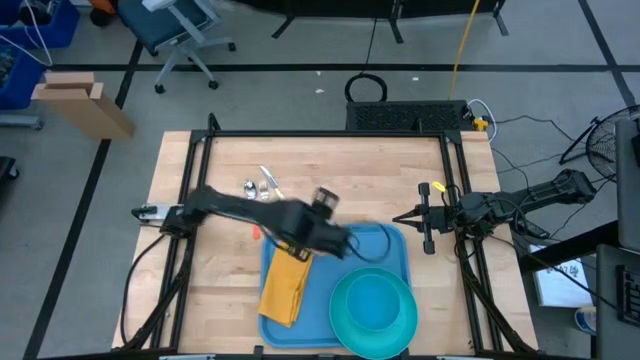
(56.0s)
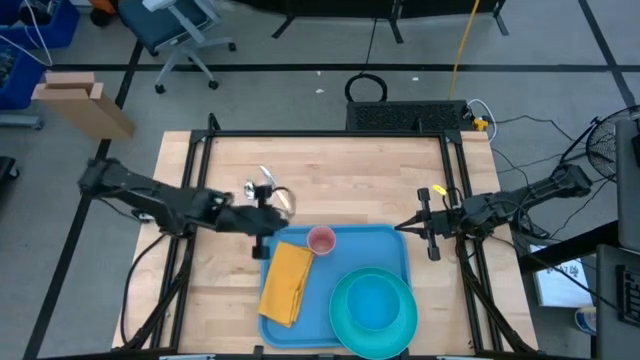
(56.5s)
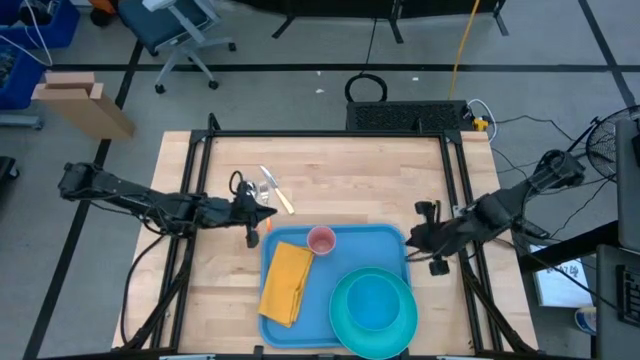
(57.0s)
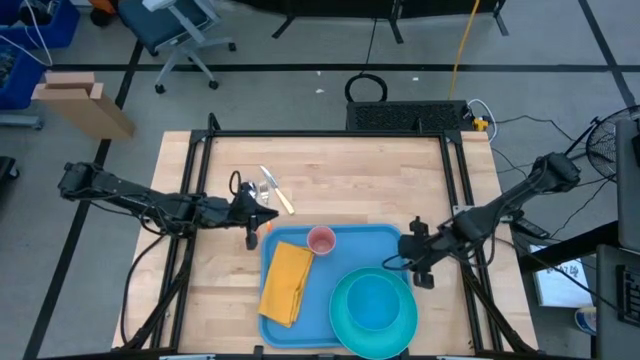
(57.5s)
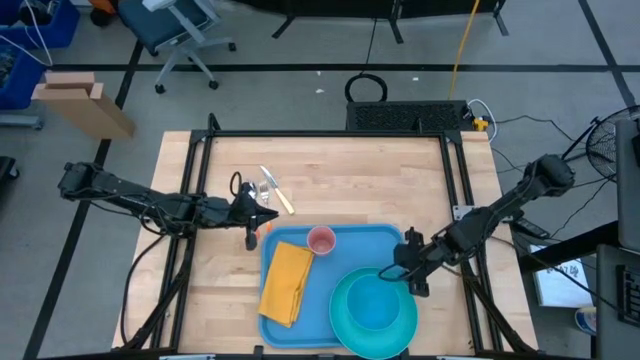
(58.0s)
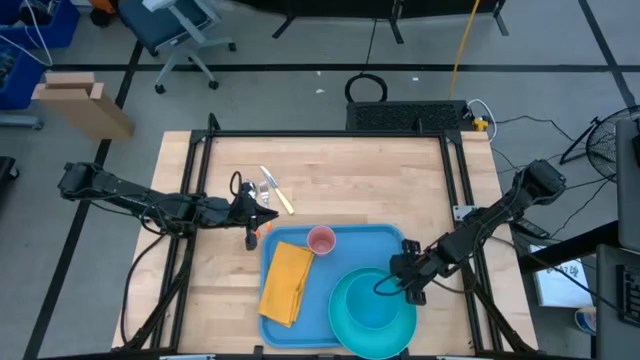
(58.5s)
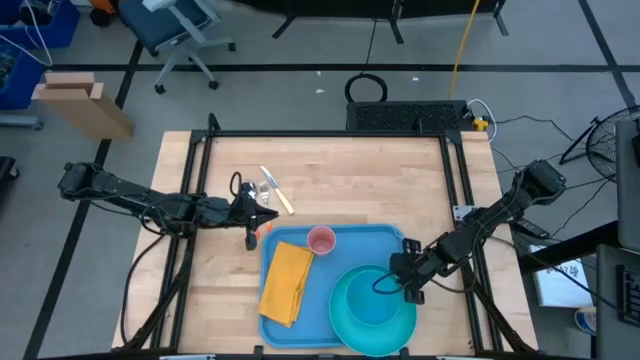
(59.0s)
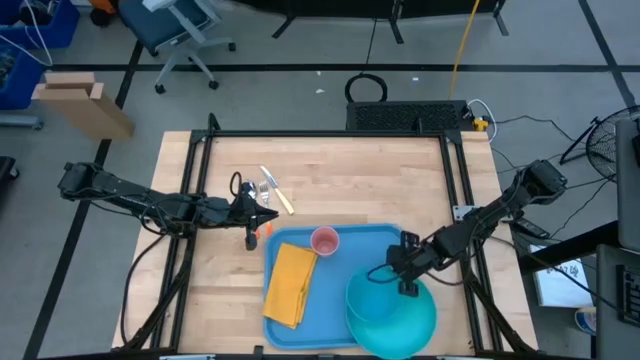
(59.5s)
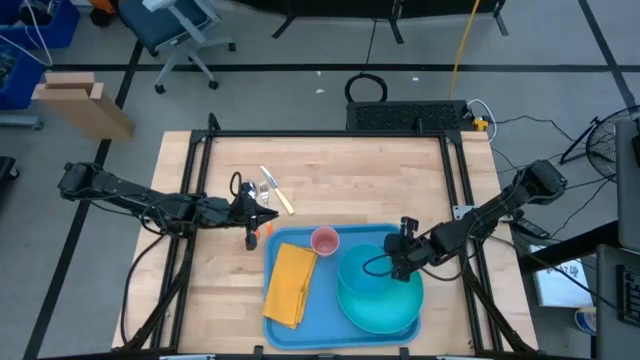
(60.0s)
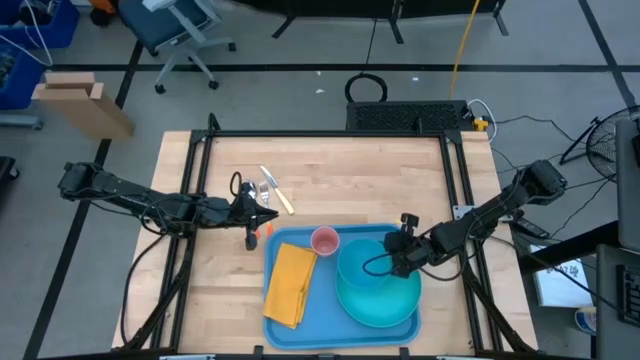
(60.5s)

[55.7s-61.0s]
Task: Set up tray
Adjust the light green plate on the blue serving tray

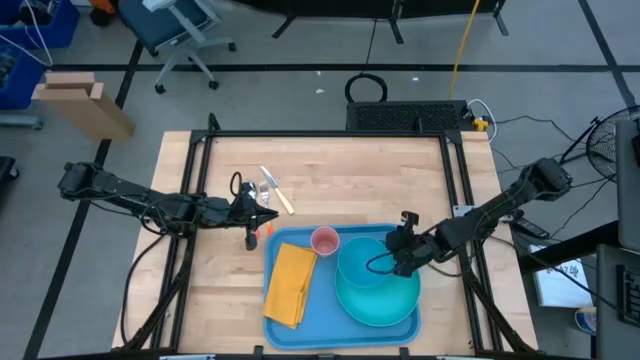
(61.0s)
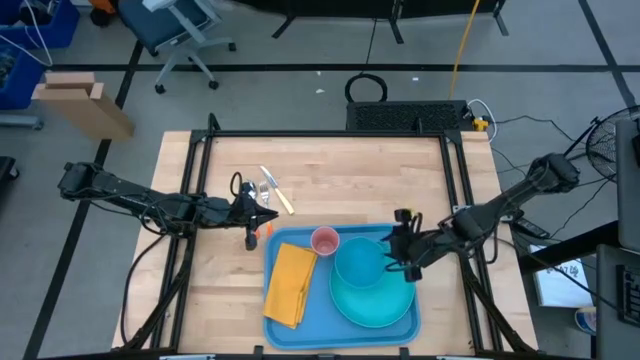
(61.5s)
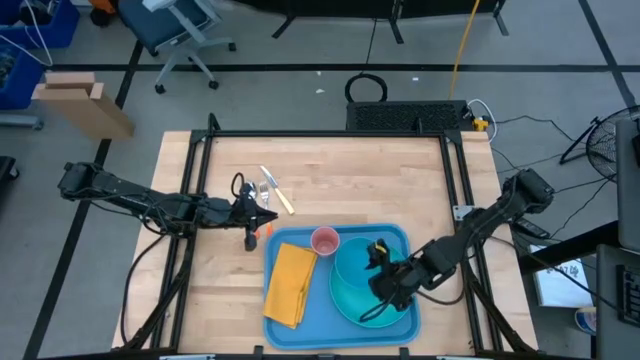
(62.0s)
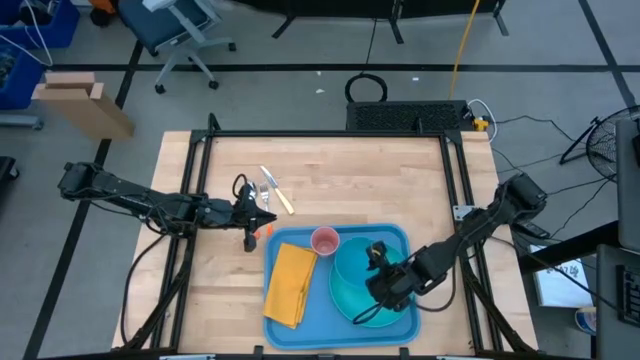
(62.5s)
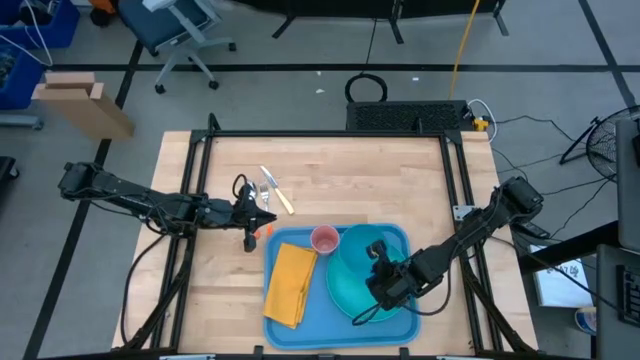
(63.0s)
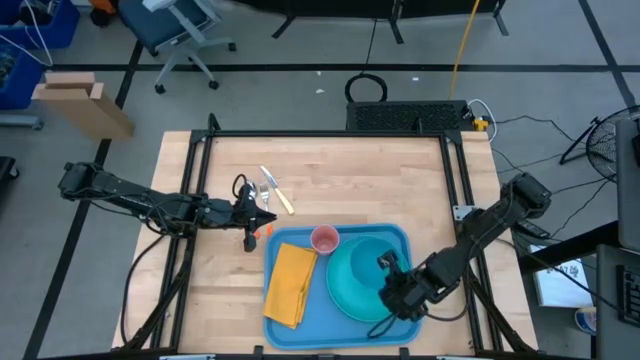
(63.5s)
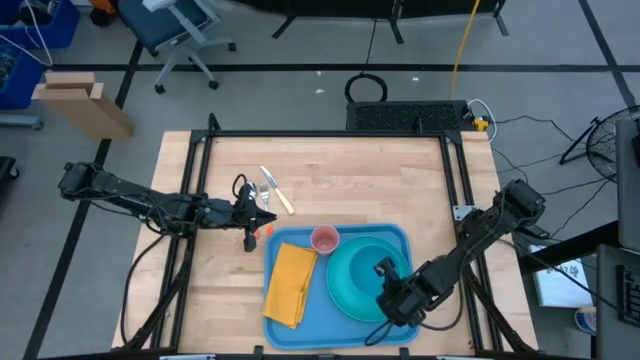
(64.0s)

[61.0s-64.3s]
Adjust the blue bowl on the light green plate on the blue serving tray

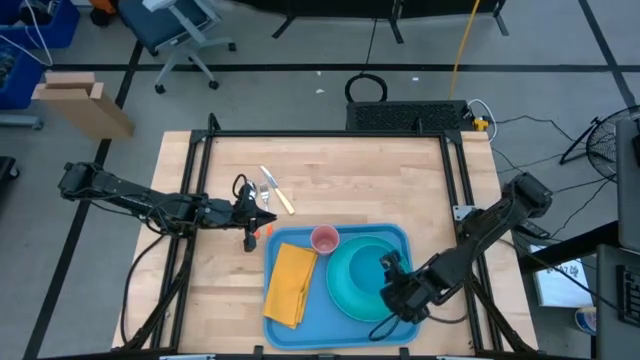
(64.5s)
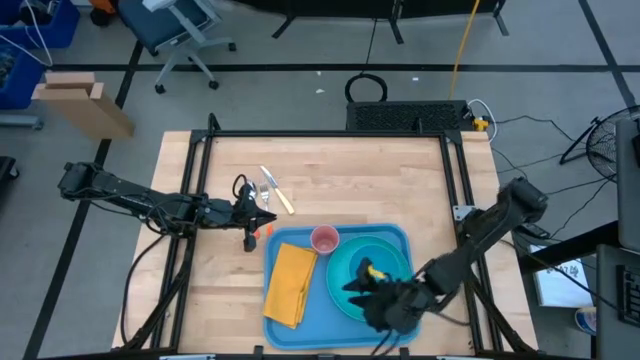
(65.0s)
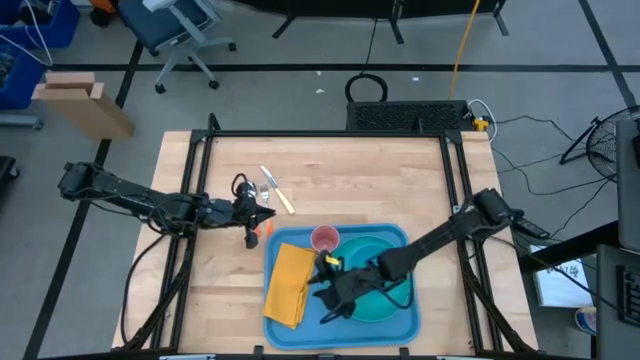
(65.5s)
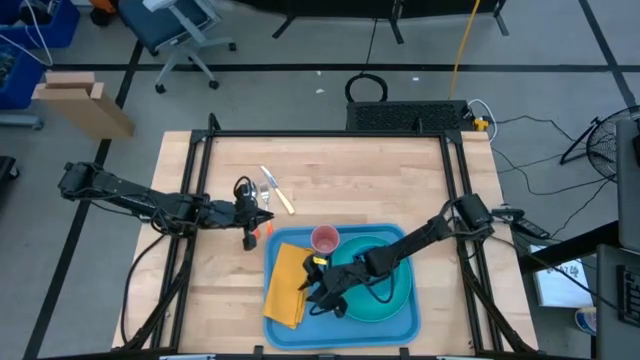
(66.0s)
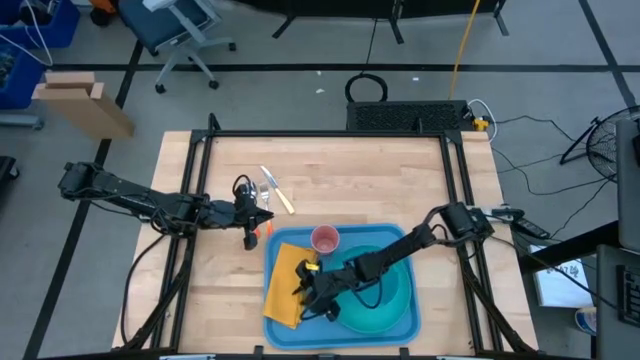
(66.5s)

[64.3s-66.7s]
Adjust the yellow napkin on the blue serving tray

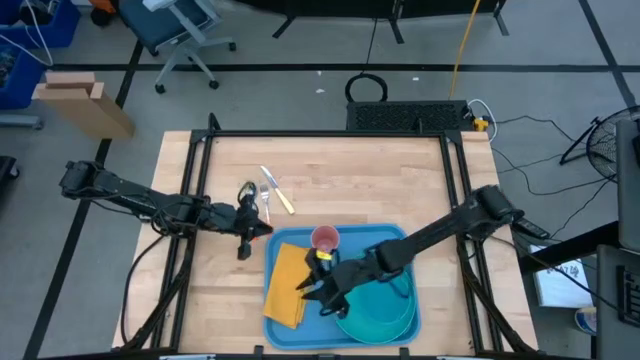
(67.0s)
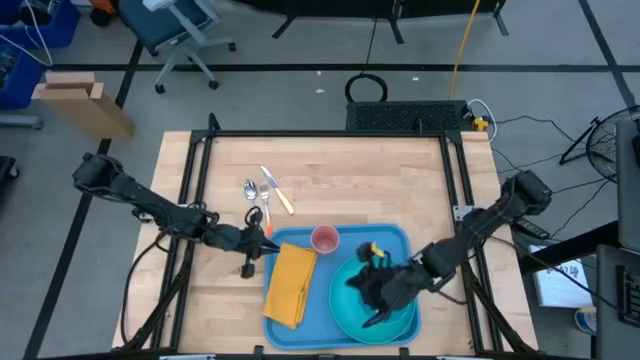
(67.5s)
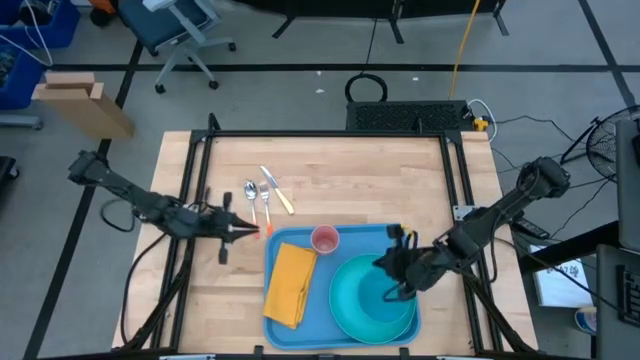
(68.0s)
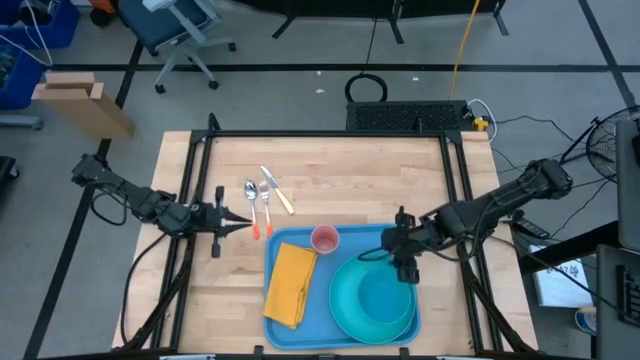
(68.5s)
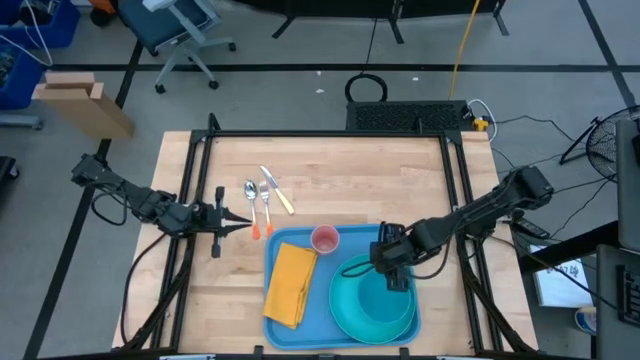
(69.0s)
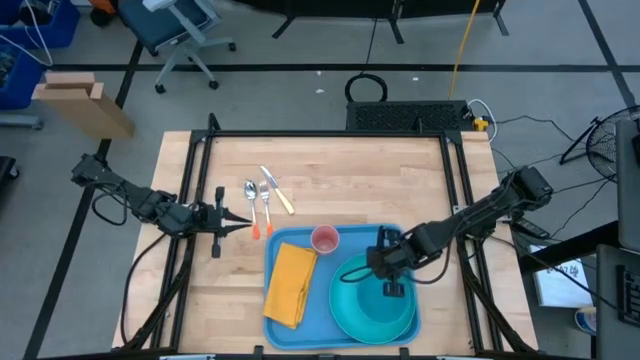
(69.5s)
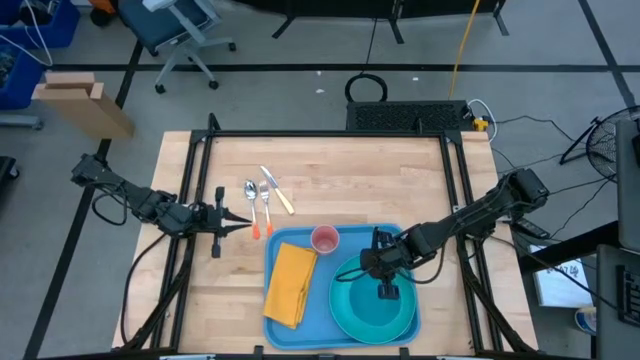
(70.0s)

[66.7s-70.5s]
Adjust the blue bowl on the light green plate on the blue serving tray

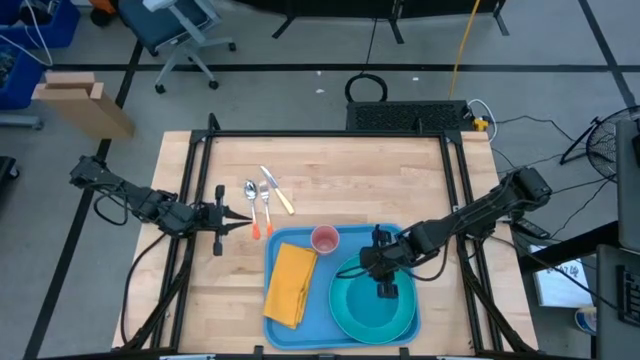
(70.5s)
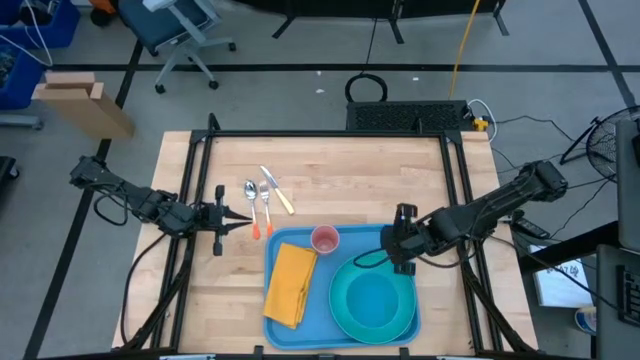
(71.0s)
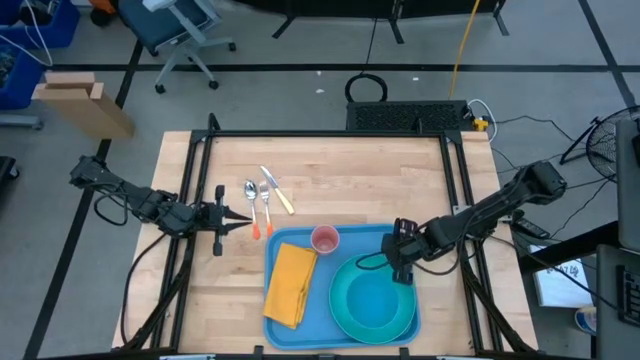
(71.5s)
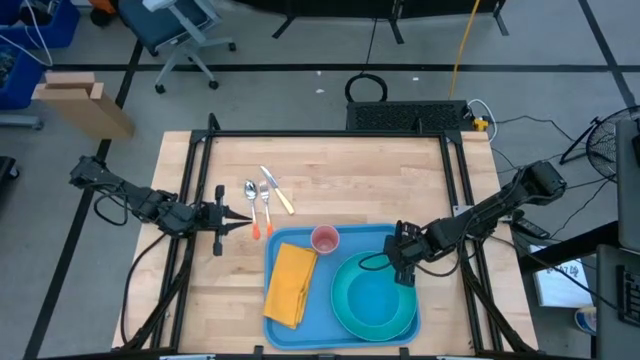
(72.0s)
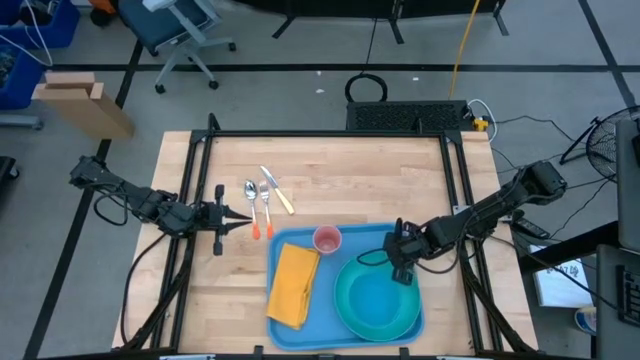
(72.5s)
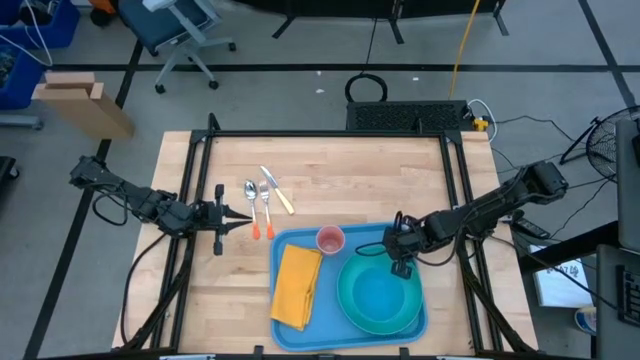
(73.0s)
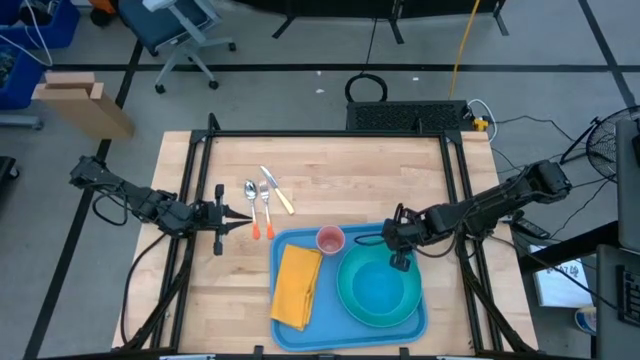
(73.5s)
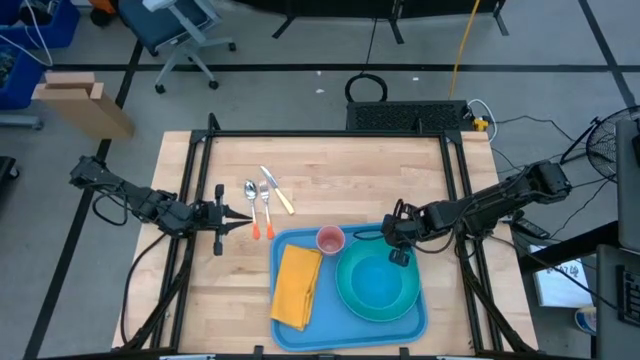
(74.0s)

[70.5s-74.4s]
Adjust the light green plate on the blue serving tray

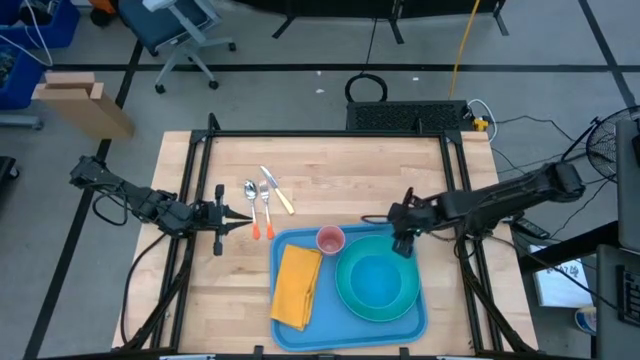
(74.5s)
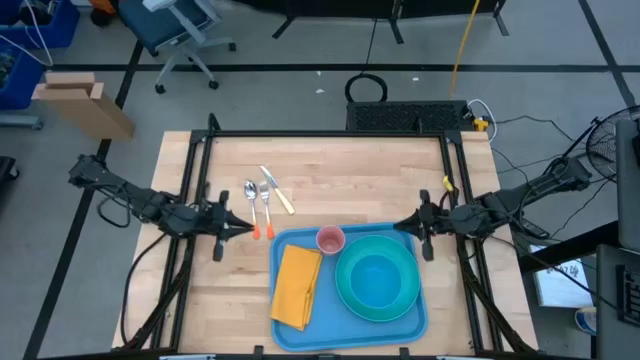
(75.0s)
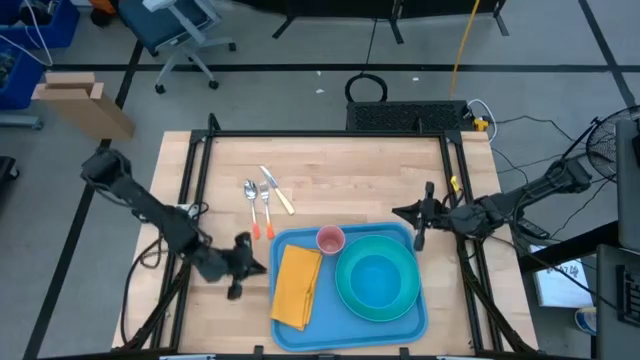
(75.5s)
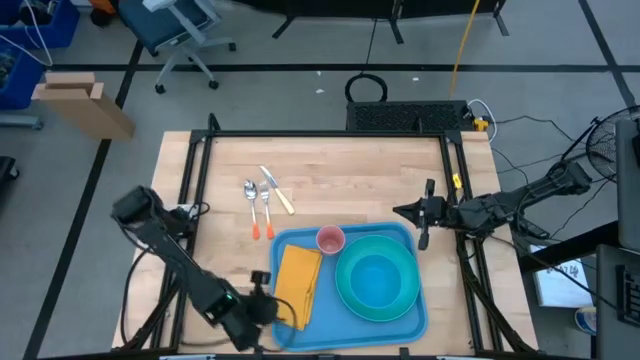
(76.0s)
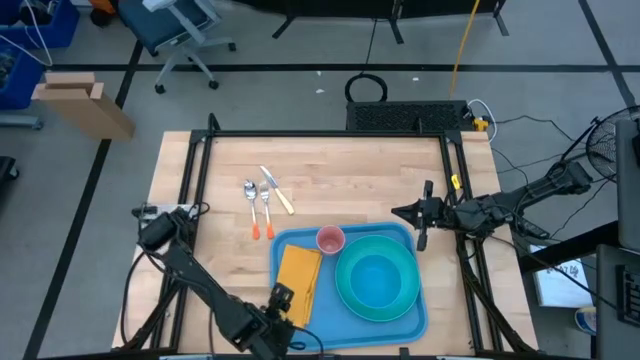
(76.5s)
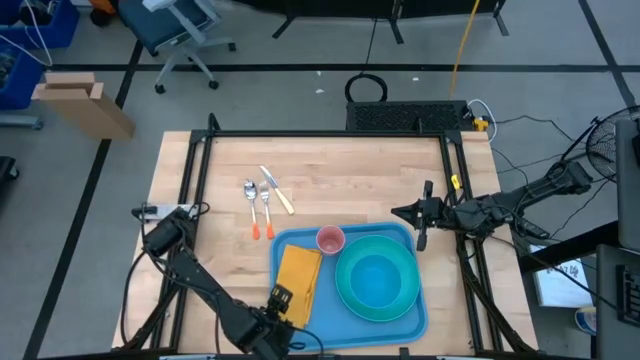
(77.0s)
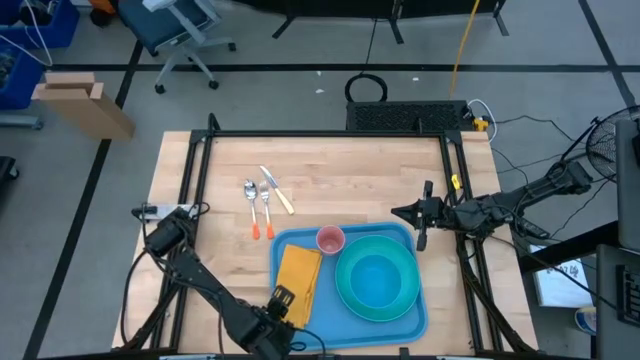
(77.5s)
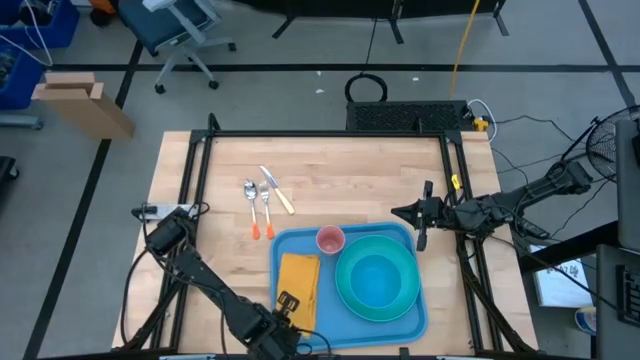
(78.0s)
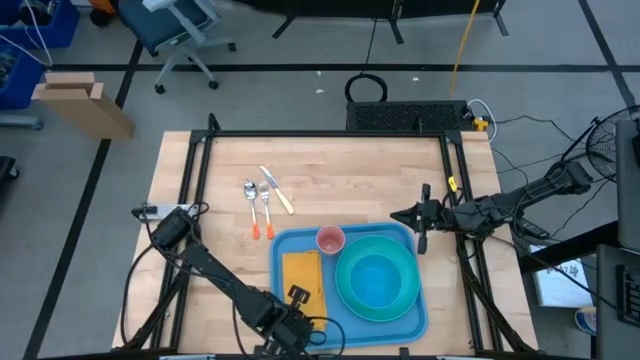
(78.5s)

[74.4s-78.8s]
Adjust the yellow napkin on the blue serving tray
